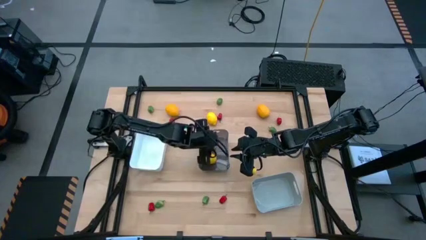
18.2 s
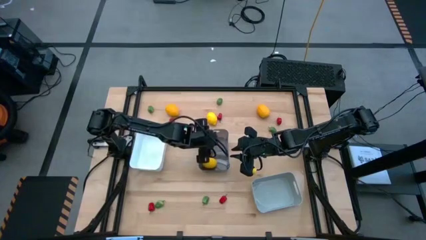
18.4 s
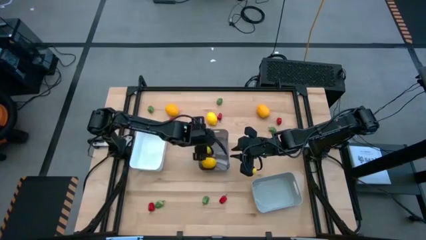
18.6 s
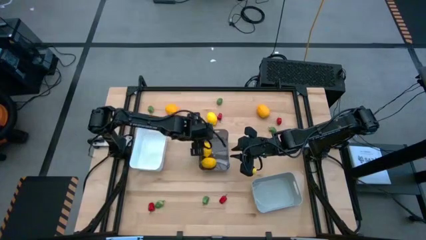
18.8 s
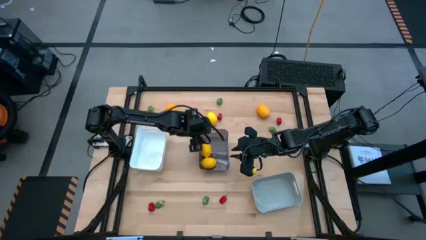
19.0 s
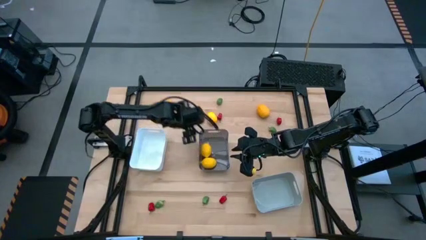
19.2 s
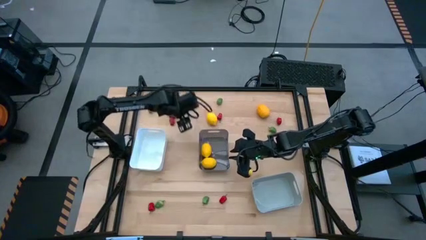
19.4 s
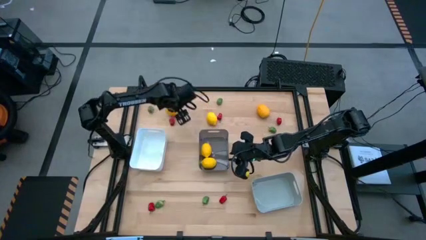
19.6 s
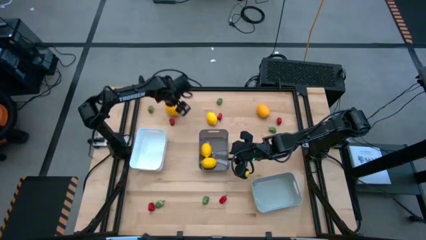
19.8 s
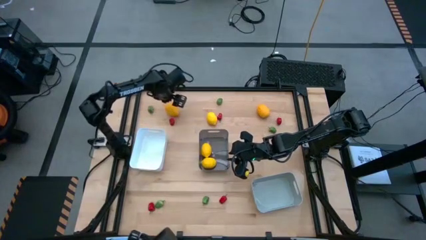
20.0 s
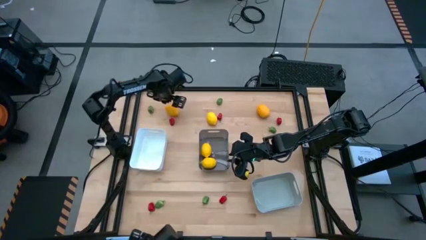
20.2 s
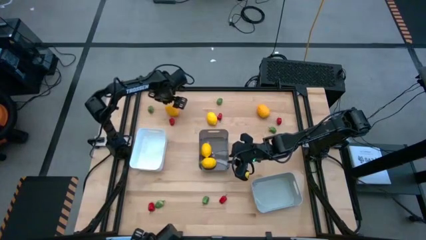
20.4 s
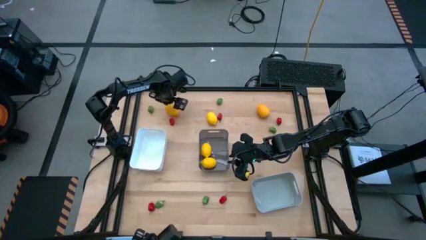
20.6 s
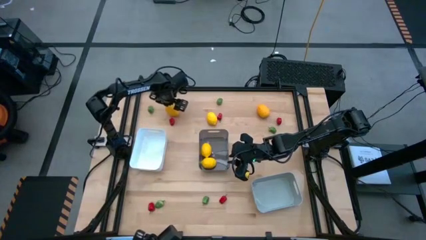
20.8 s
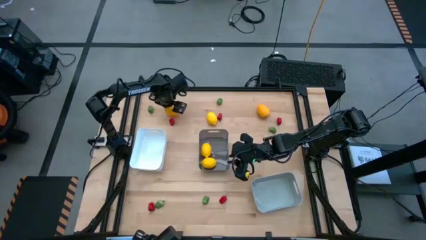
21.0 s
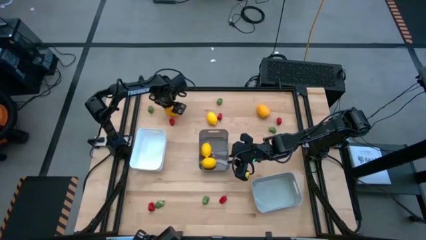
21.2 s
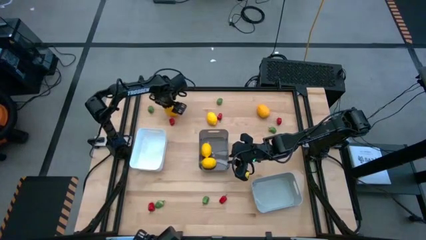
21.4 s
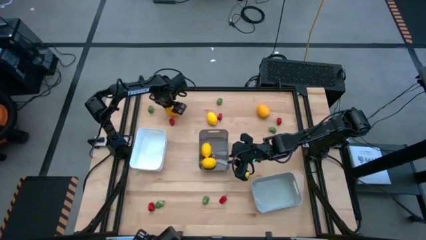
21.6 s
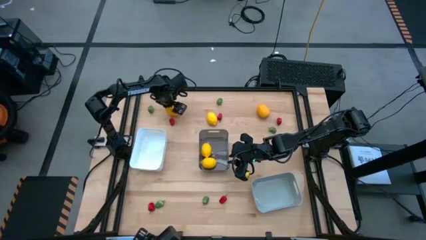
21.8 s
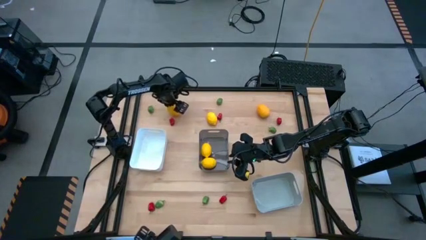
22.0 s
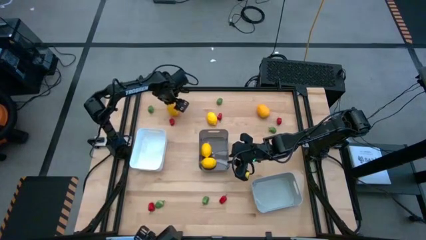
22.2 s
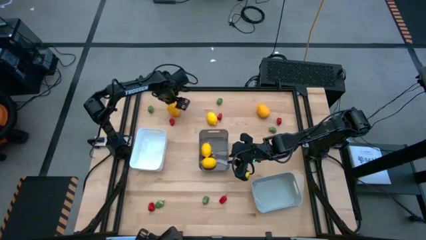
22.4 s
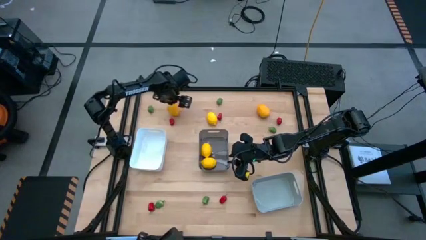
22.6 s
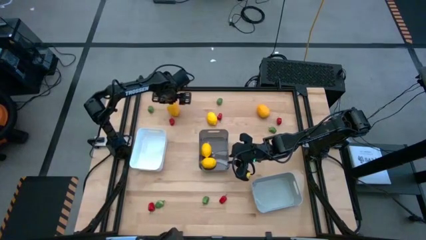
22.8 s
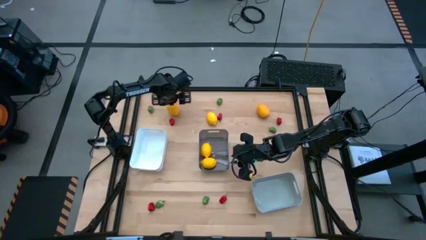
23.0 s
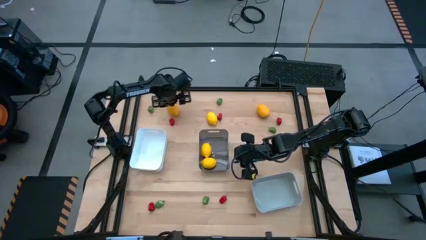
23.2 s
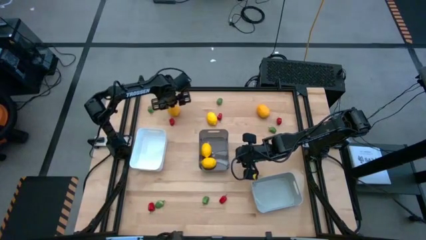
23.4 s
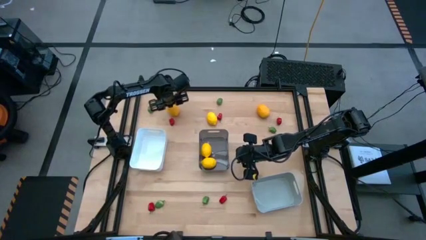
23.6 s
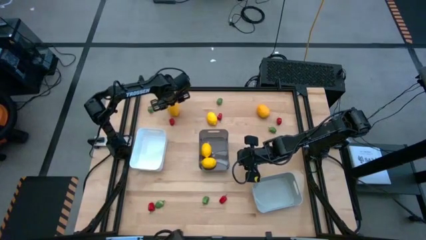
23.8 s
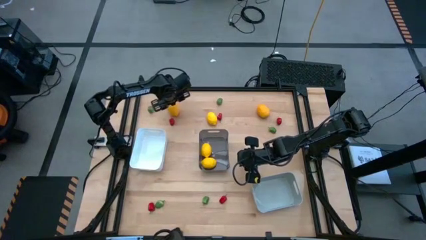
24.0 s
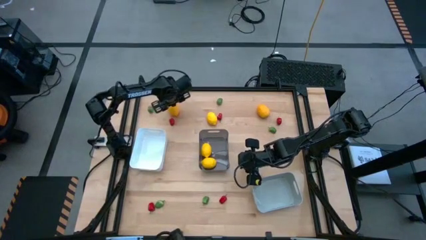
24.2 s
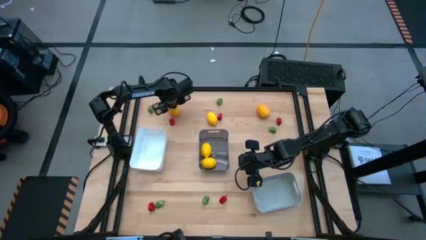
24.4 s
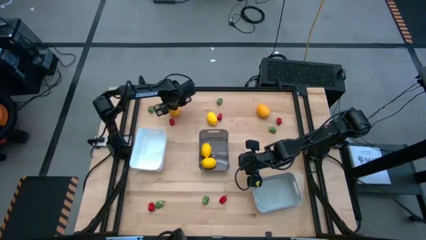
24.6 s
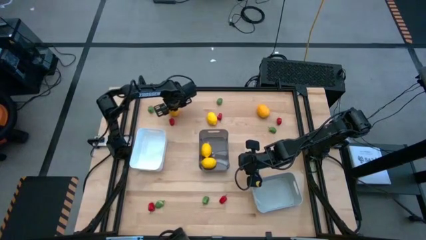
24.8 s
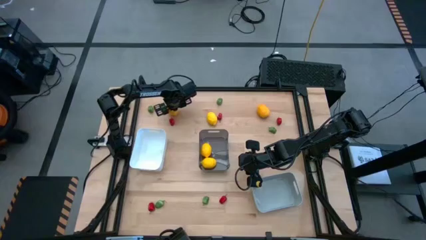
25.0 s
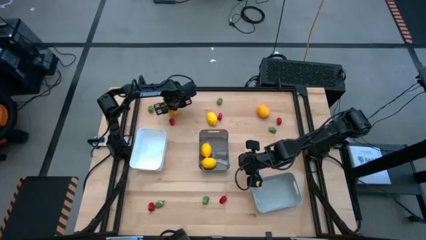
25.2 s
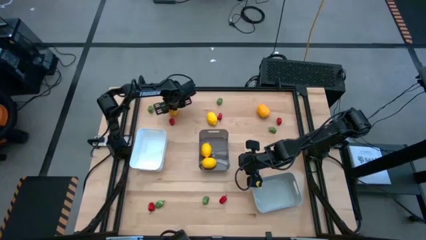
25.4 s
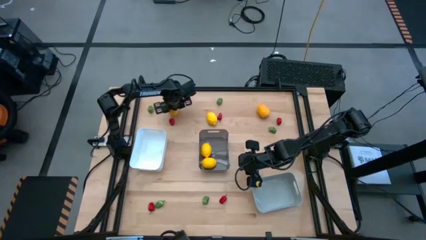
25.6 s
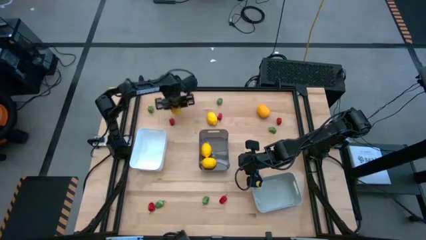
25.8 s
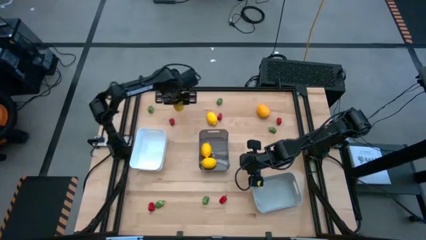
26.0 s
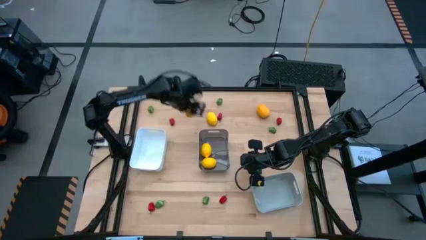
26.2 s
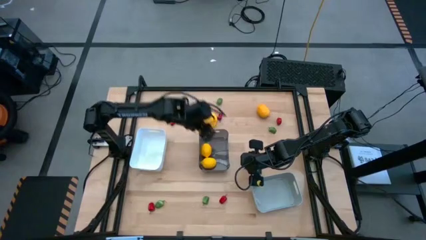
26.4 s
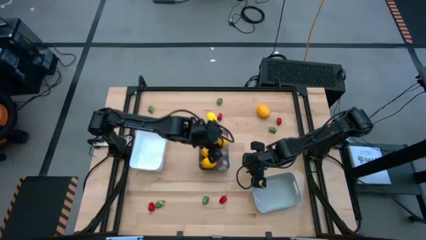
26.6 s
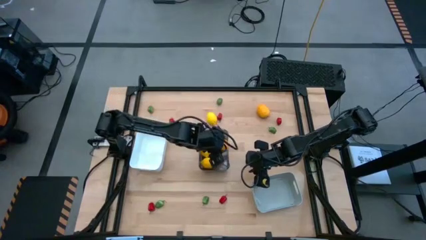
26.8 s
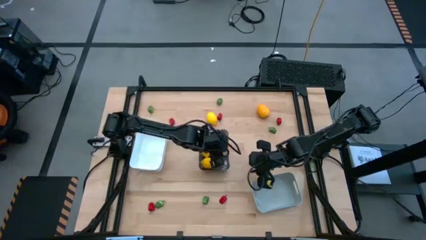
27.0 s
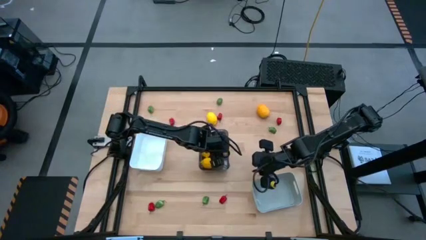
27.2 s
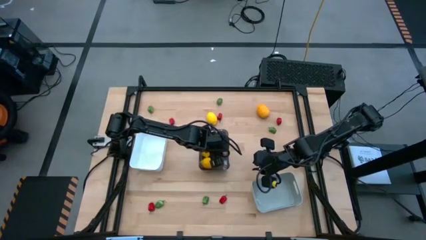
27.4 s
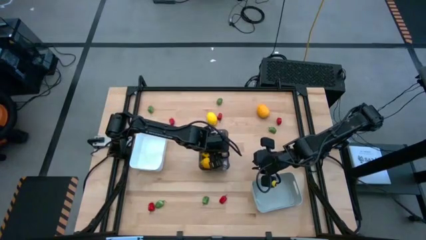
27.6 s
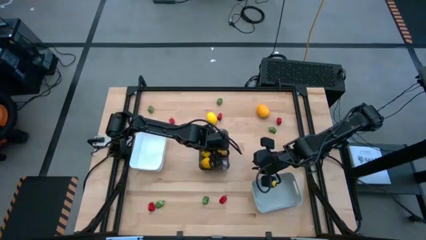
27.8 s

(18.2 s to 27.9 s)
Task: Sort produce into baskets
Put the lemon into the black bin

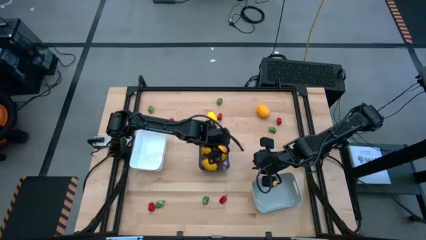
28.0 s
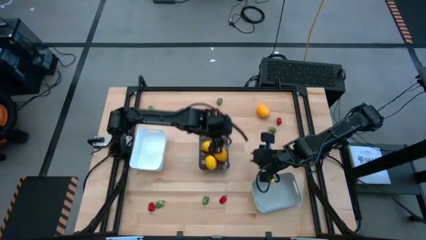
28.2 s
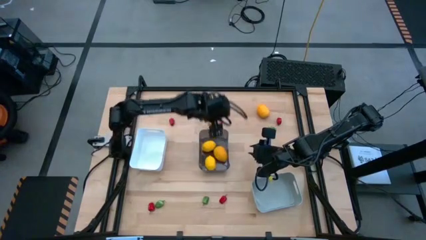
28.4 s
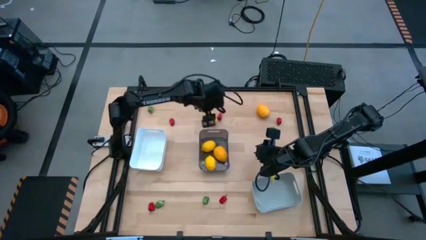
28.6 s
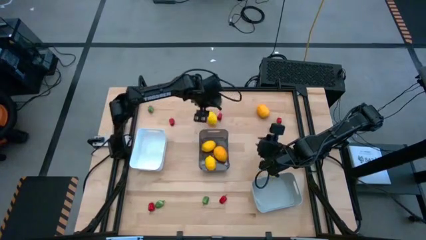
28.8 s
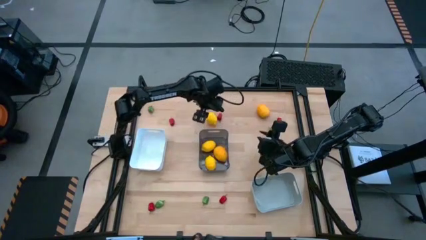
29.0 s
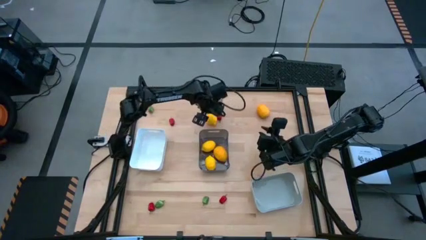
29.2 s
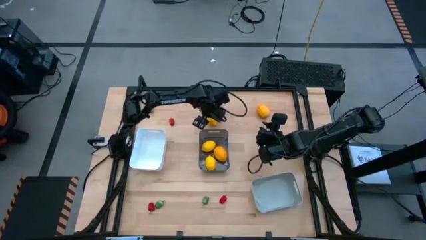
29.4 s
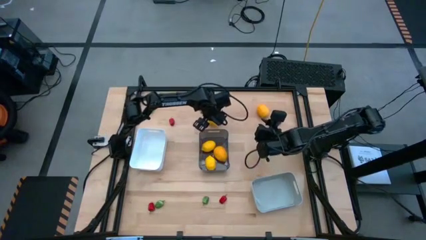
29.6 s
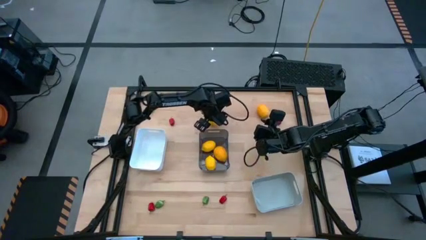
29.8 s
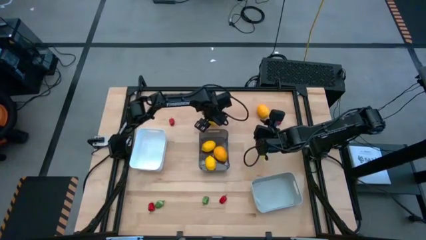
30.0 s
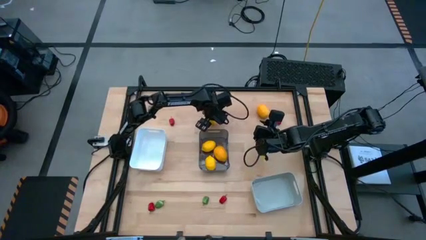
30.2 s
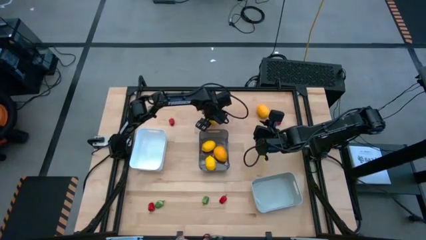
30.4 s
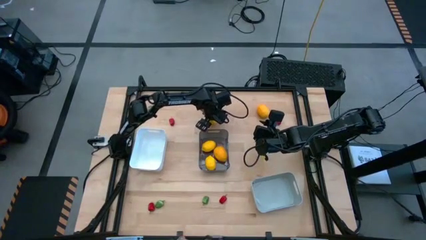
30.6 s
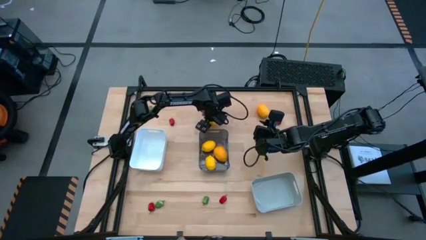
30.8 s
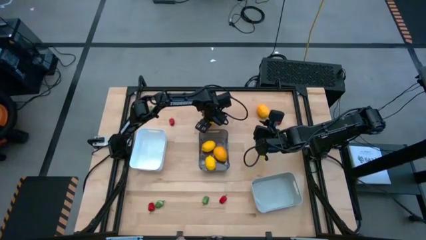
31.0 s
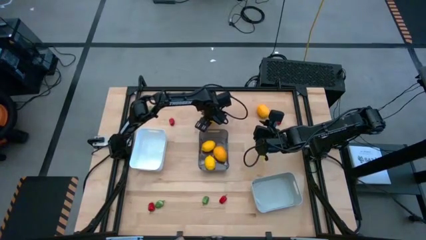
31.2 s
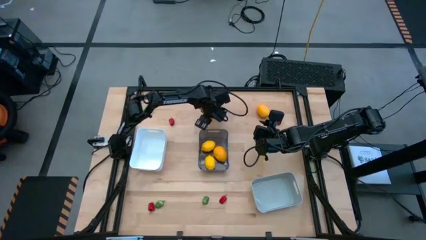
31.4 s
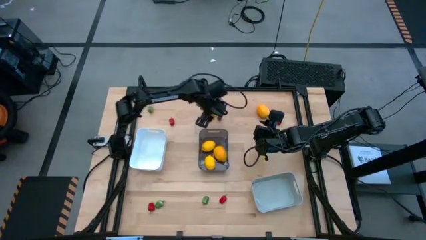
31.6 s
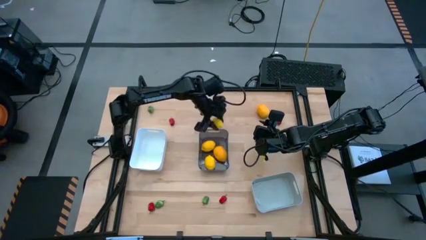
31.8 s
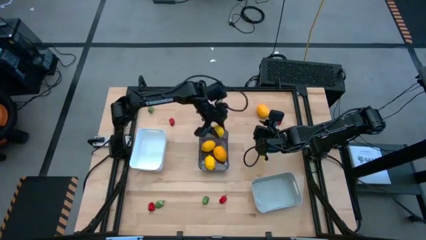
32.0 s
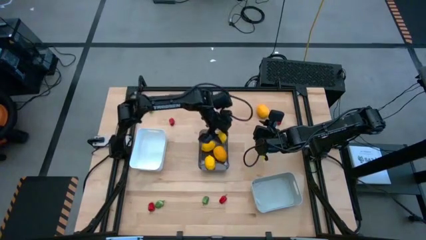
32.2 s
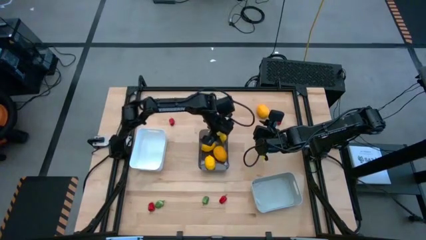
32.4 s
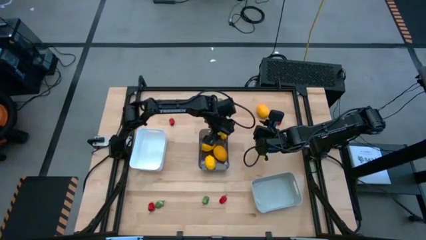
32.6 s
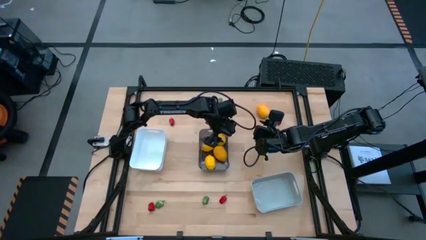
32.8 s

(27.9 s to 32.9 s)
Put the lemon into the black bin
